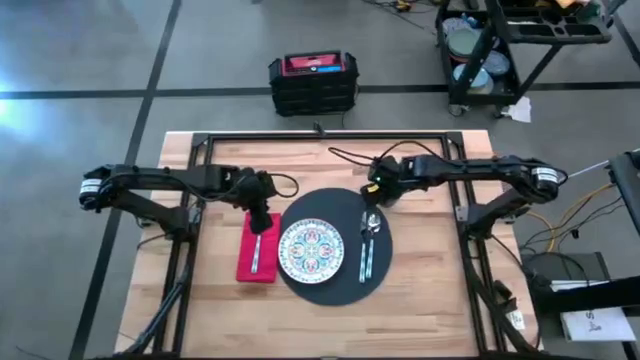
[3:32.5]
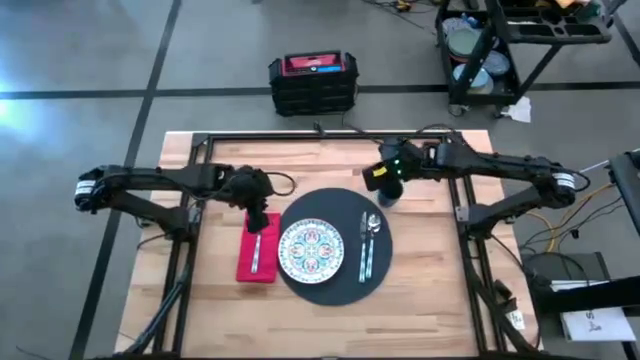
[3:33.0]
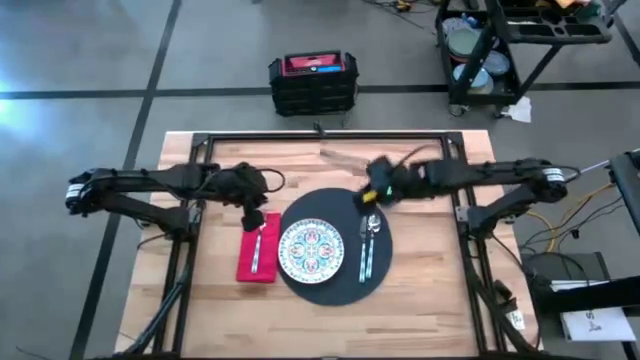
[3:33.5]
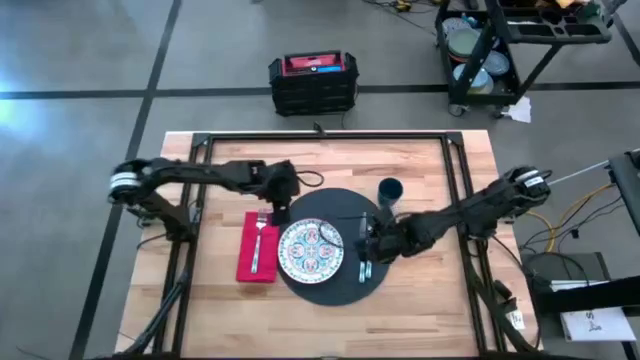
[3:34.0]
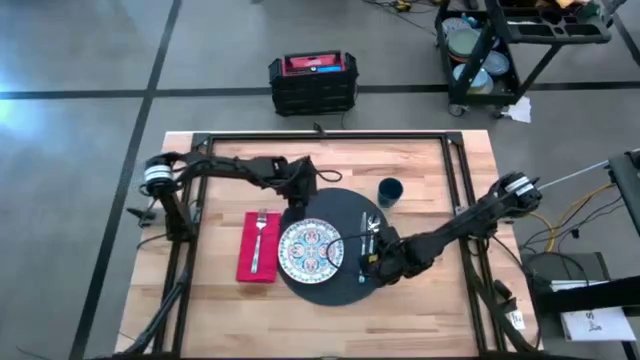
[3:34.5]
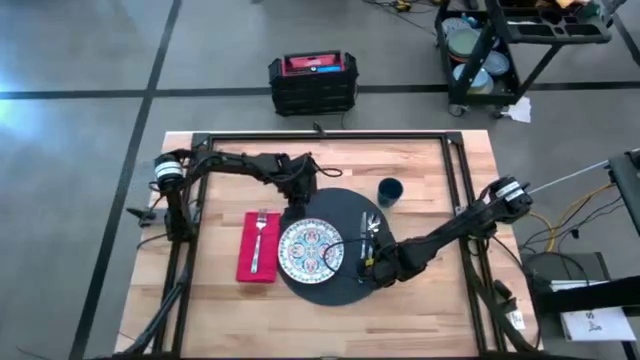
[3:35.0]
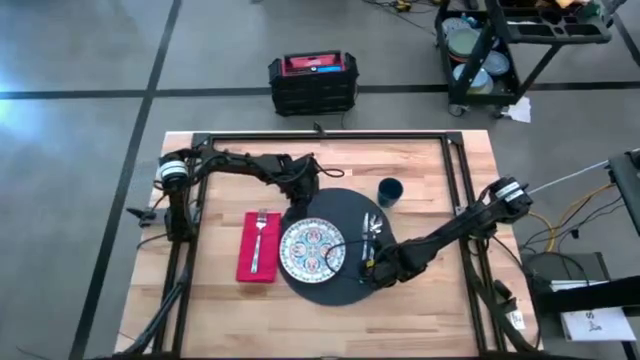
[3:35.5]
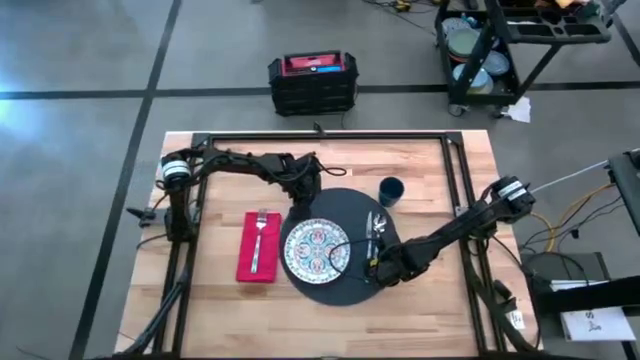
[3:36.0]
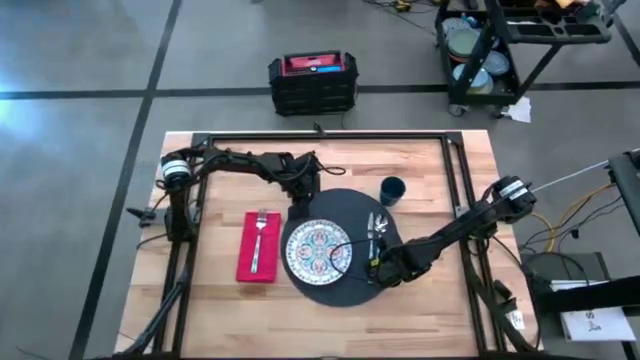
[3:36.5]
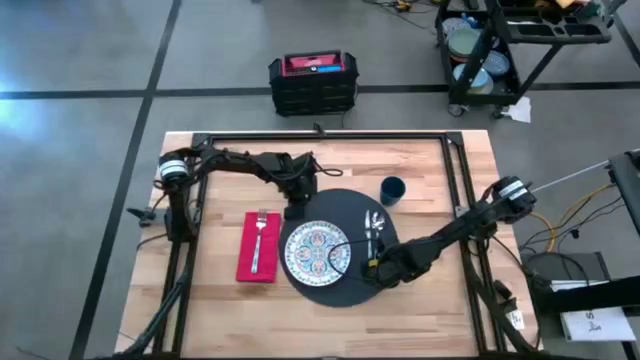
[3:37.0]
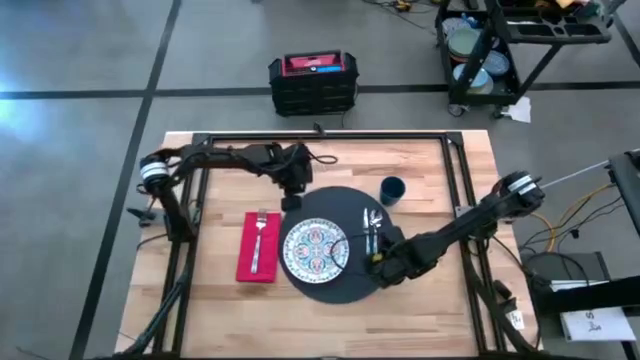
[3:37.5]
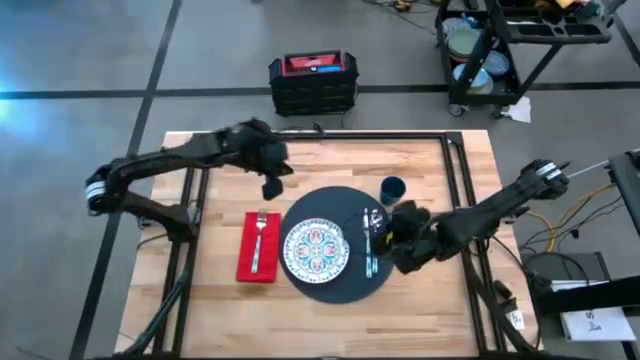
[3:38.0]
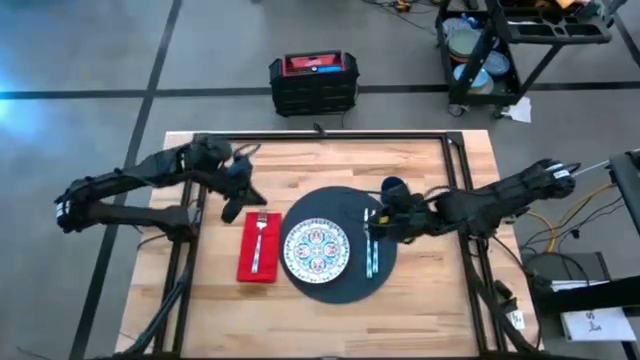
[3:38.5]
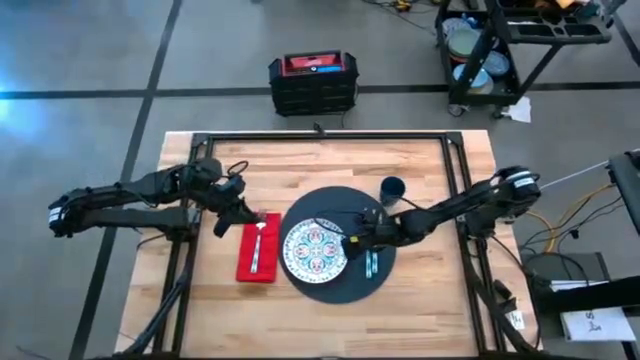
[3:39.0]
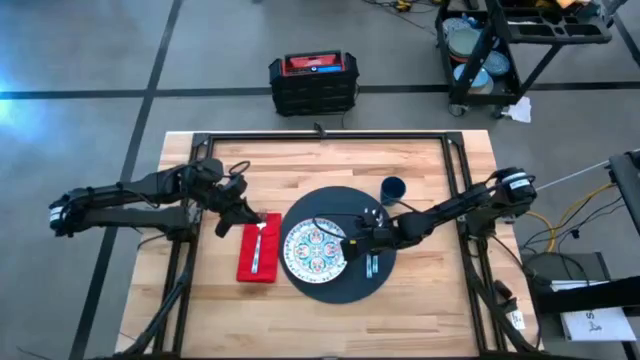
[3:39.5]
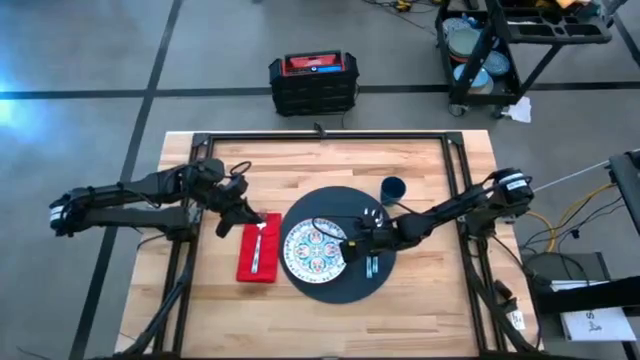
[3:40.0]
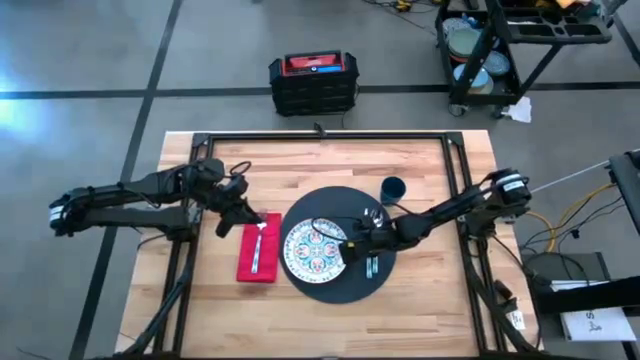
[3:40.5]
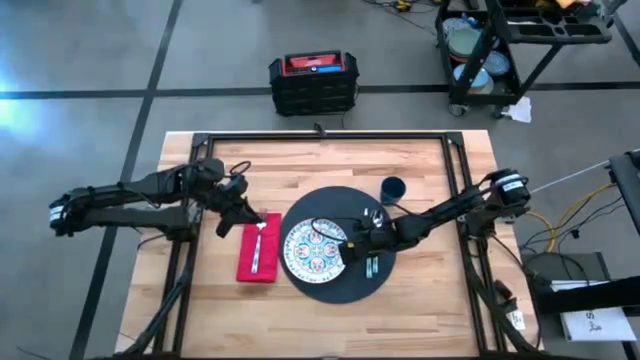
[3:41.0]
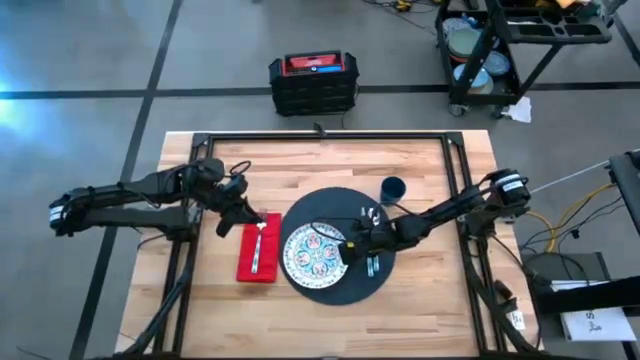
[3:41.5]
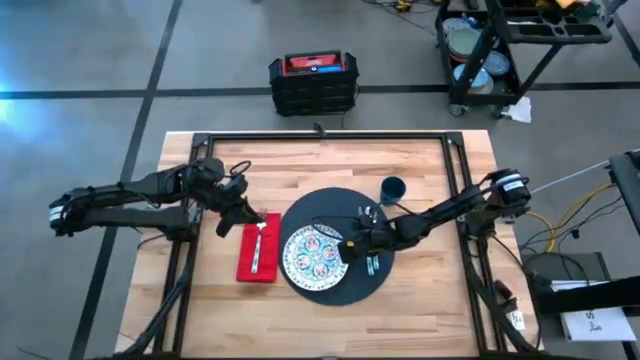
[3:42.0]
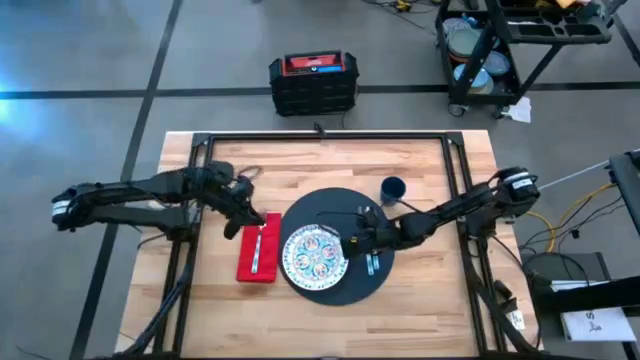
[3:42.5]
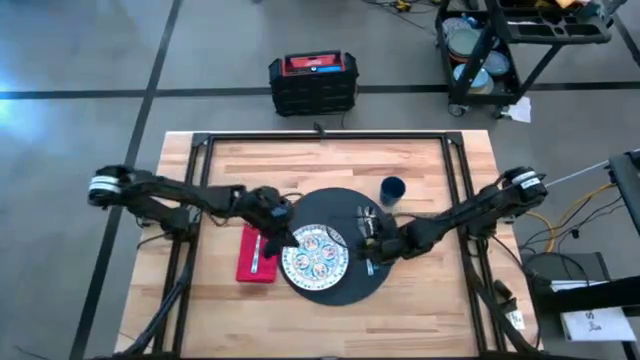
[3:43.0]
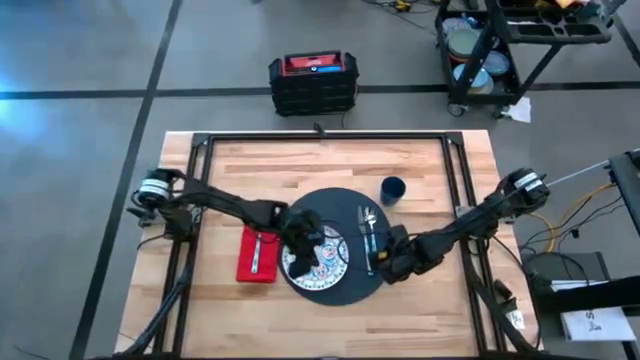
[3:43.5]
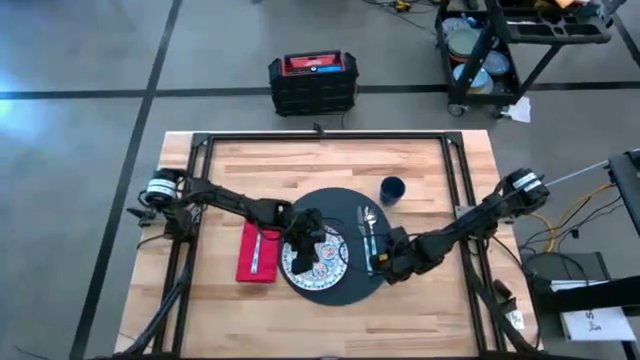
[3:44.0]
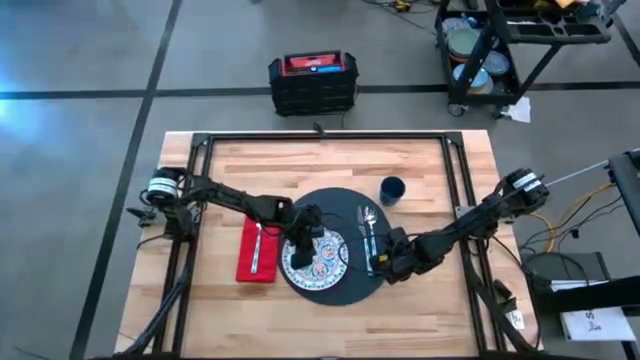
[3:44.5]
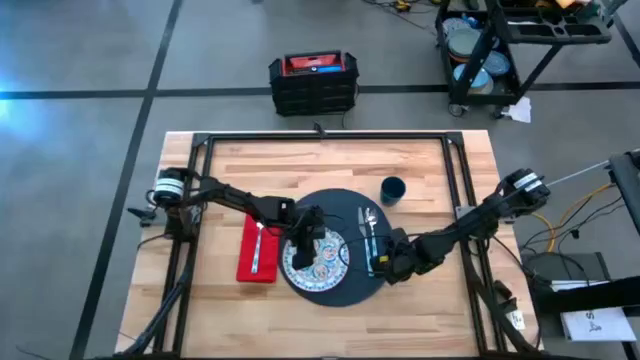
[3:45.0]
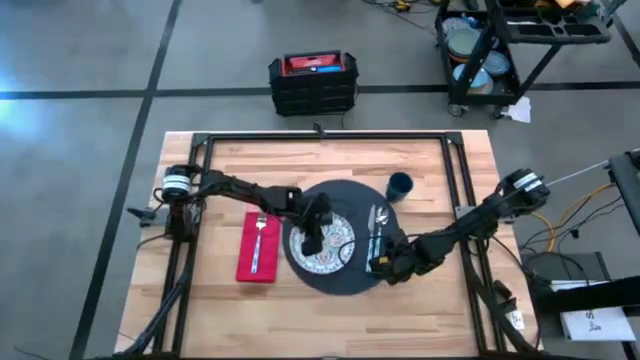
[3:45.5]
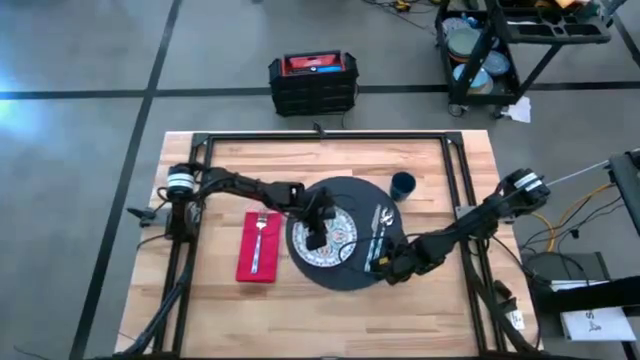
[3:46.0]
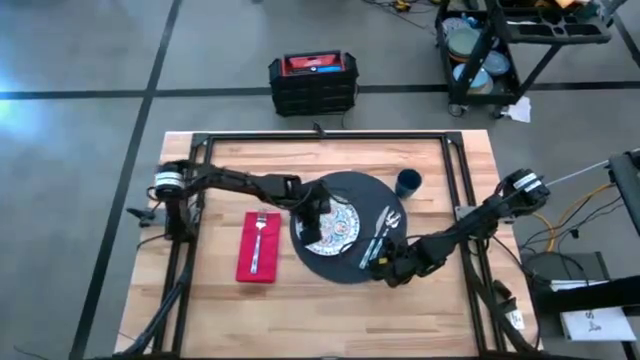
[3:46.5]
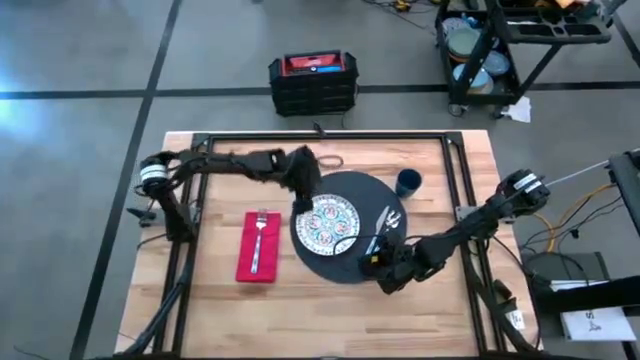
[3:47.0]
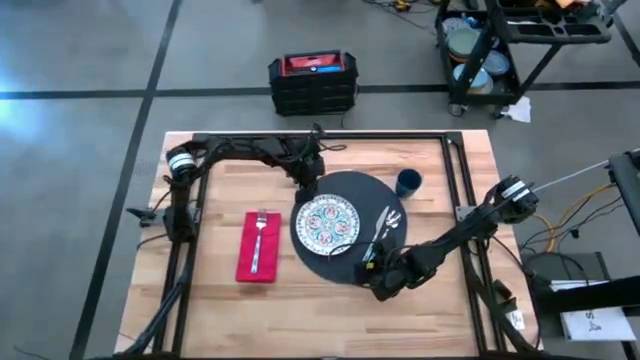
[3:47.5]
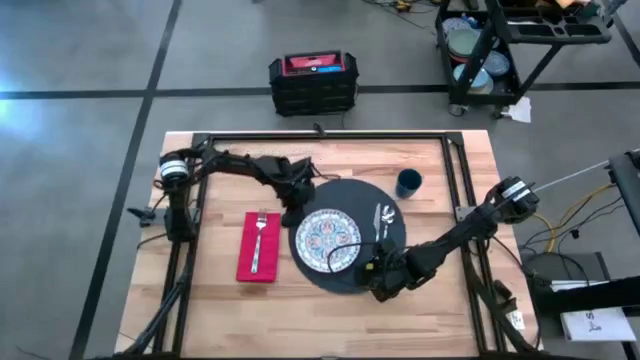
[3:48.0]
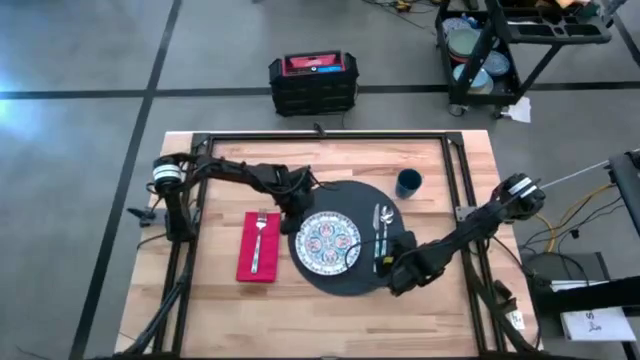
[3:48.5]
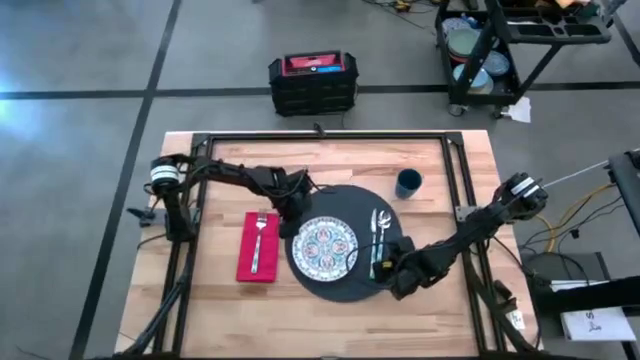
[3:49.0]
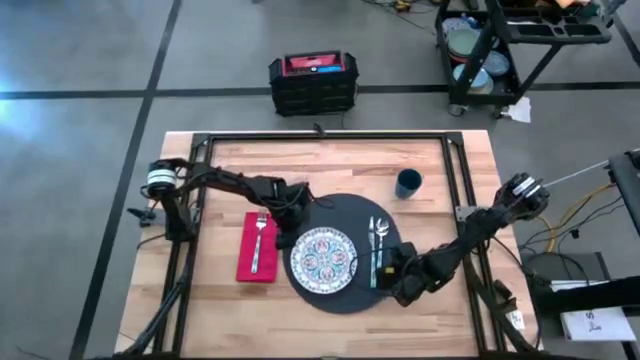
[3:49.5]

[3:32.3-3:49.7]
Task: Set table place
Adjust the black placemat

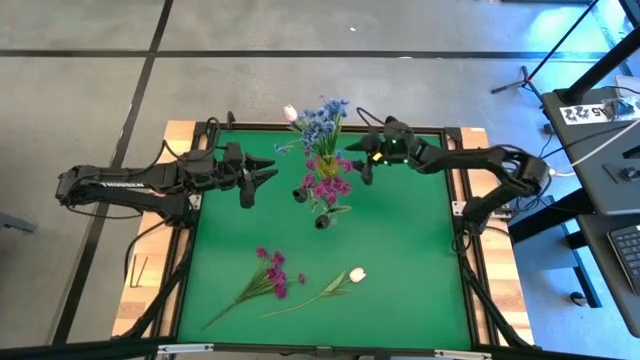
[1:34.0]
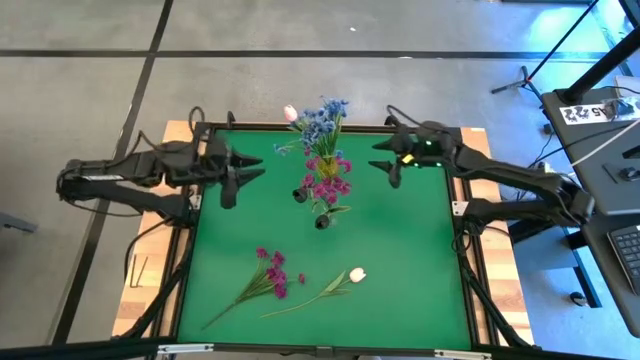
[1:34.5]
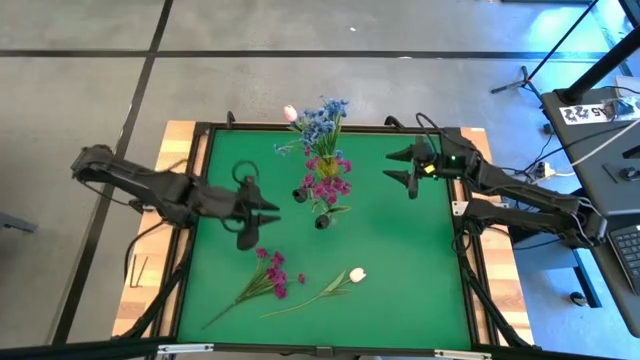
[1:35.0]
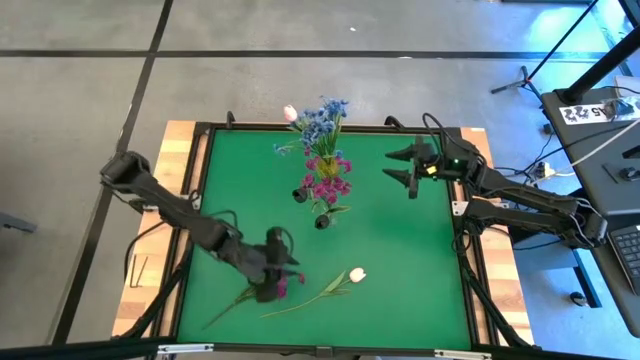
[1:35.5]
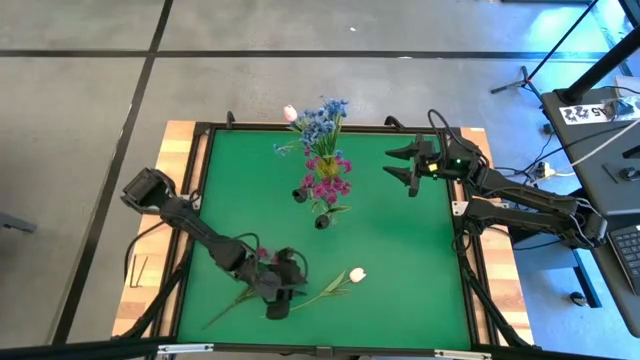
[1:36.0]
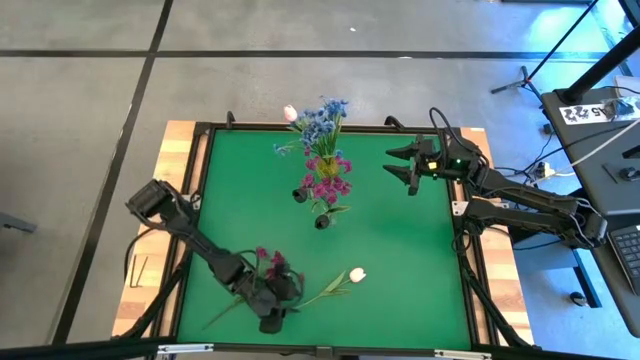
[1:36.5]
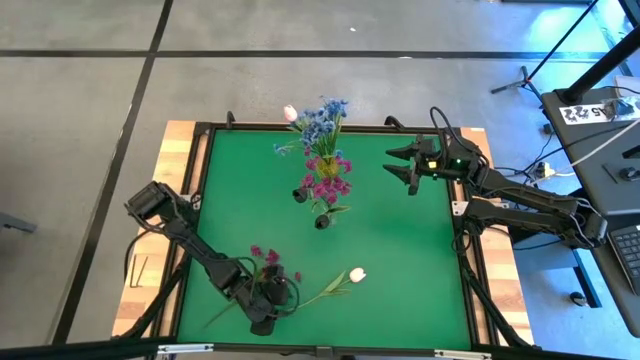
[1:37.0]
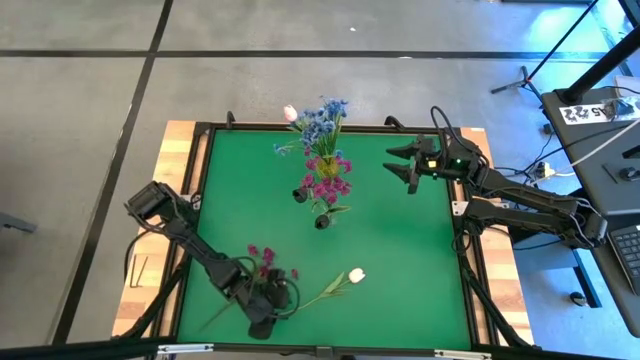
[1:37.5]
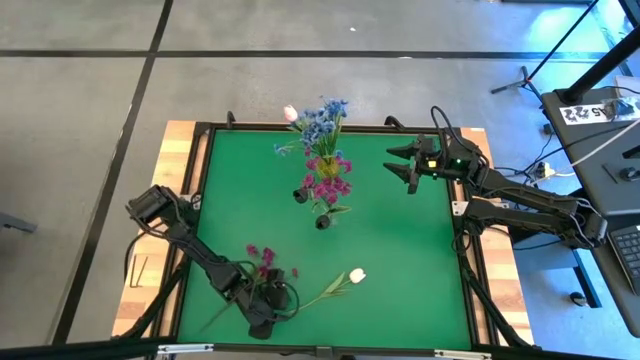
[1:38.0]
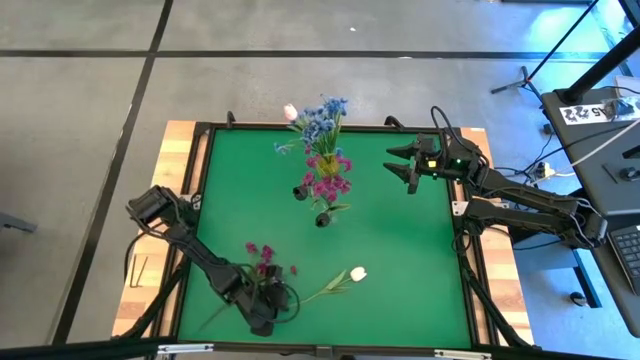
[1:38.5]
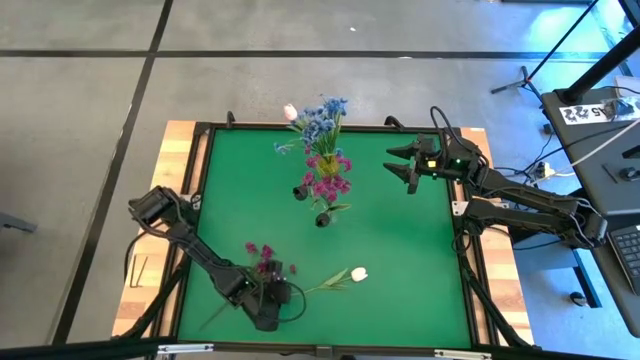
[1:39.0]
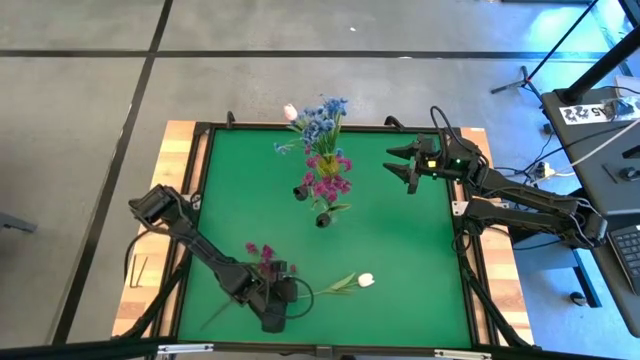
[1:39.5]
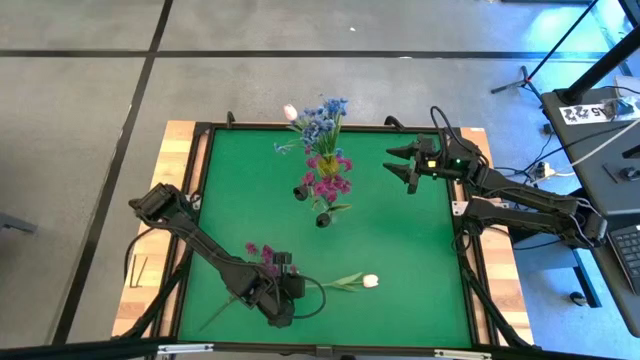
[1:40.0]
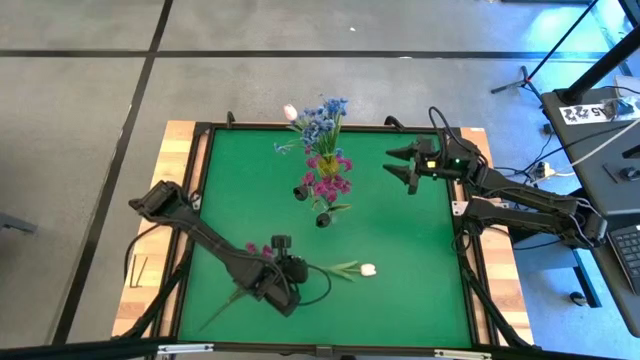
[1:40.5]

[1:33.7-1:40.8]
Task: Sort flowers into vase by color
Put the pink tulip into the yellow vase
